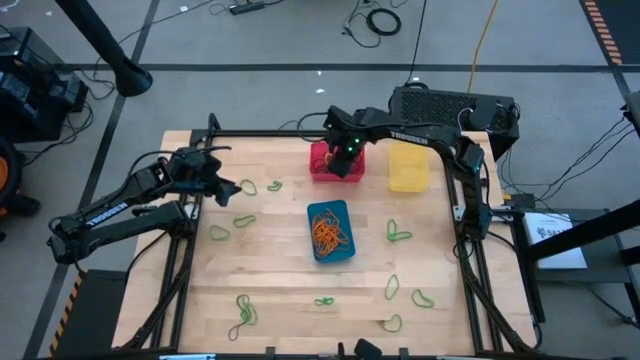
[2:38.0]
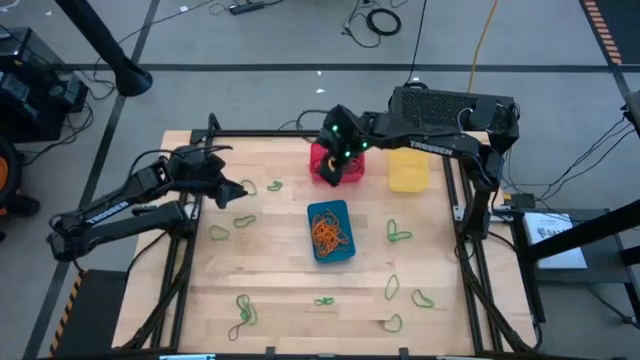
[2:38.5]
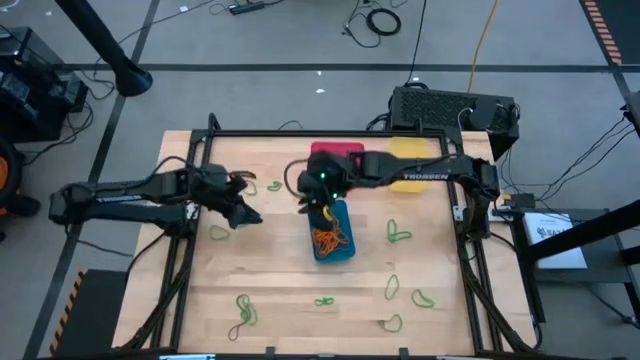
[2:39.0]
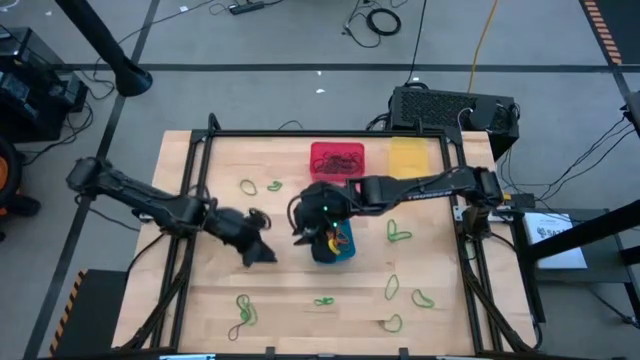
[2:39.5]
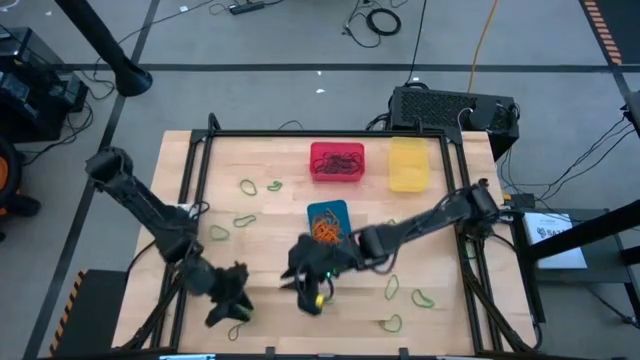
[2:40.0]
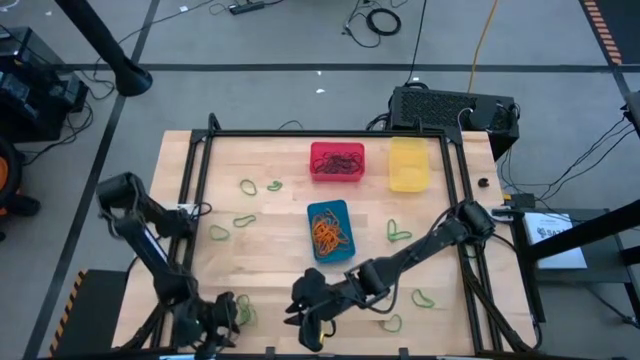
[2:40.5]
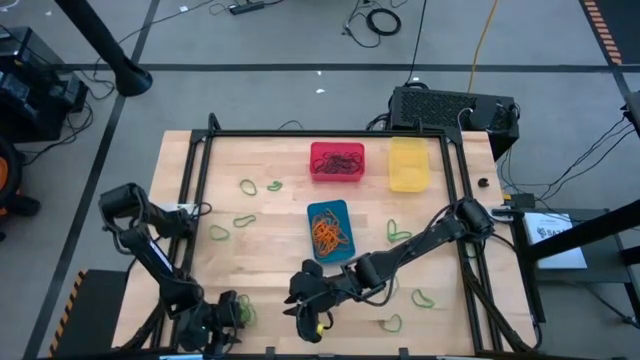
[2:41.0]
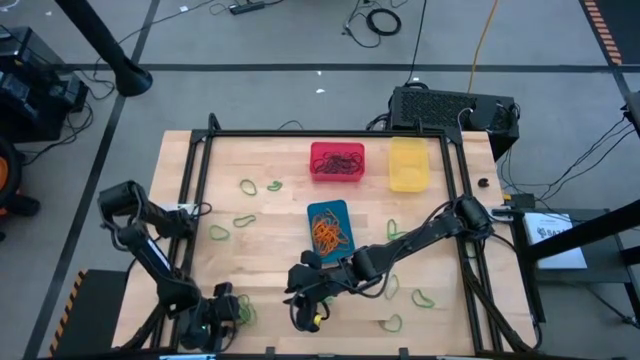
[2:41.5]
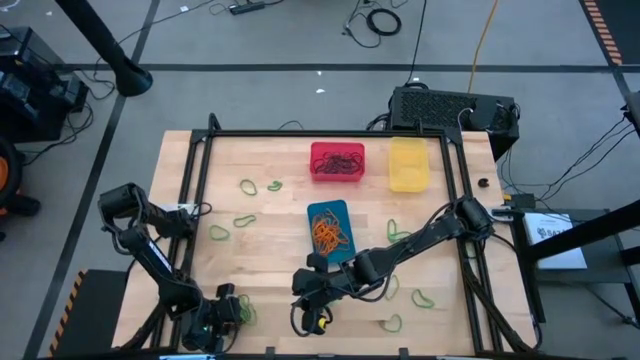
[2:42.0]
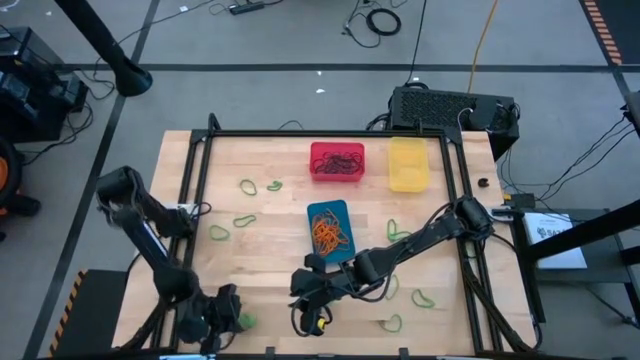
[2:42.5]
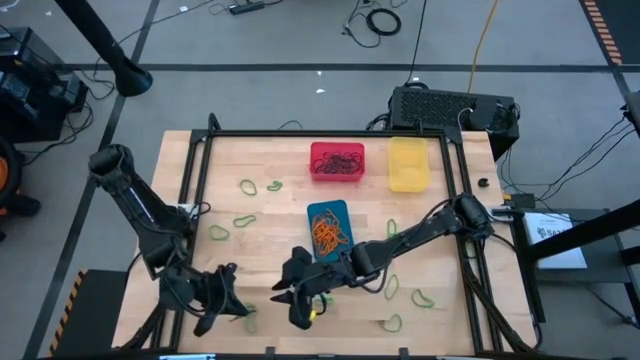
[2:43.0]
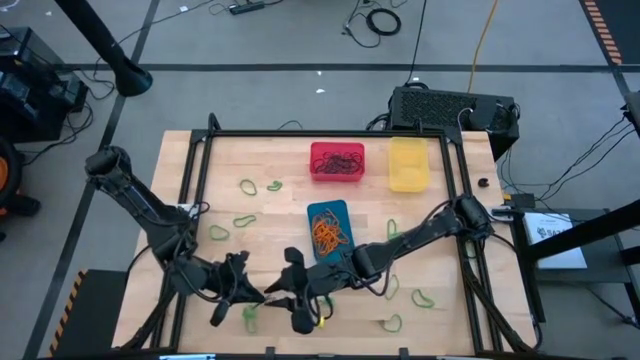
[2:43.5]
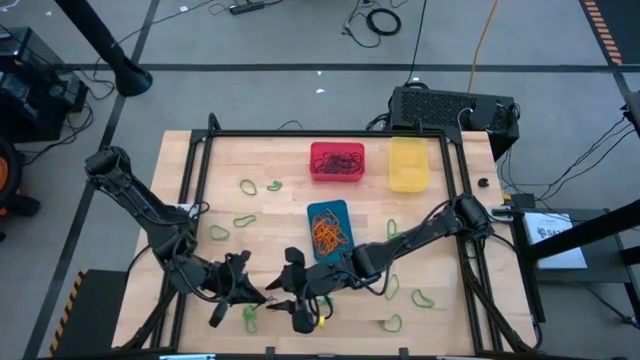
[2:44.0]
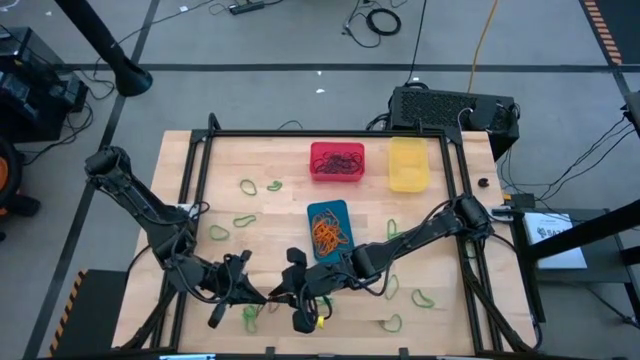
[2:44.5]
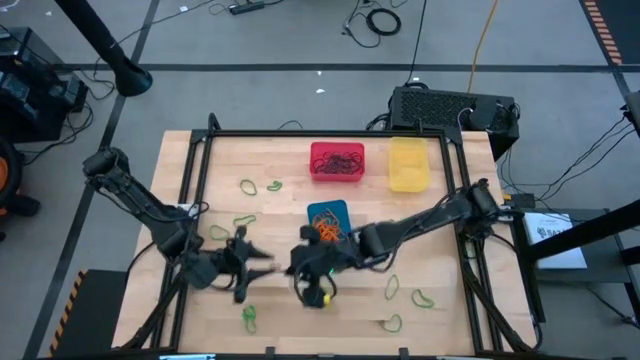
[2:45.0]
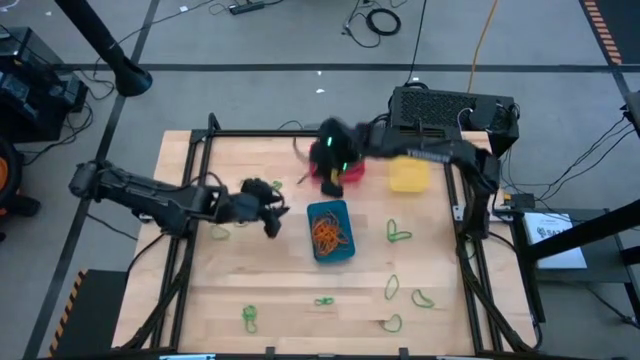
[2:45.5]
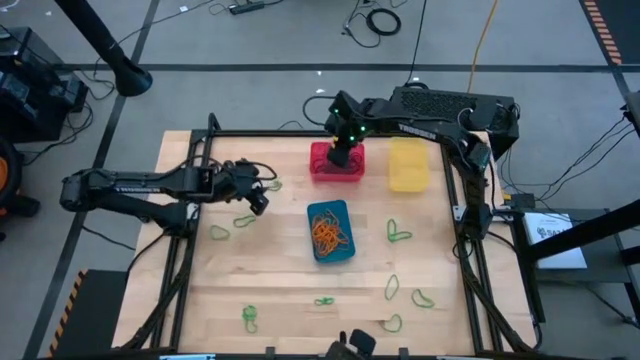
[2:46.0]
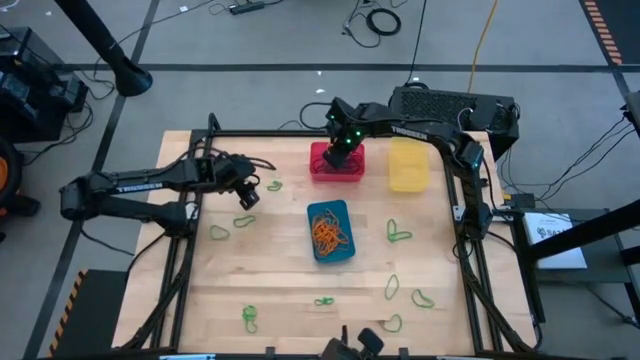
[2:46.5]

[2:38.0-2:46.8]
Task: Sort rubber bands into baskets
Put the purple rubber band into the red bin

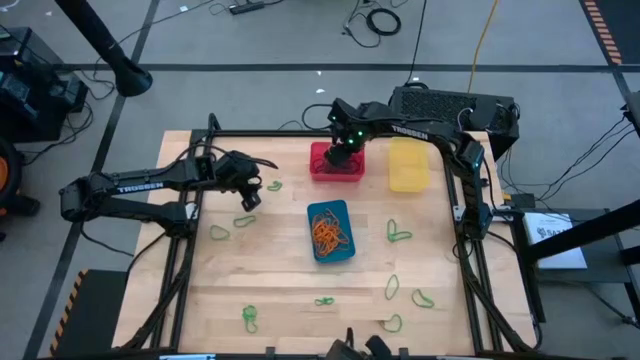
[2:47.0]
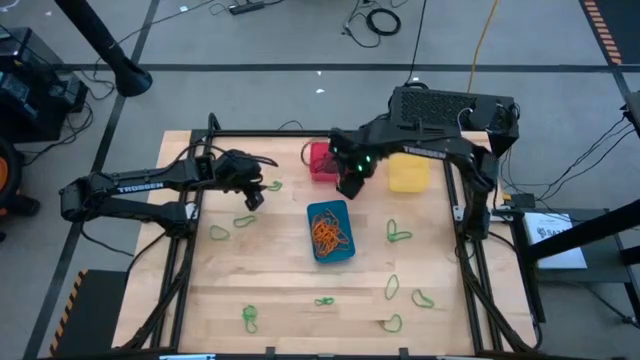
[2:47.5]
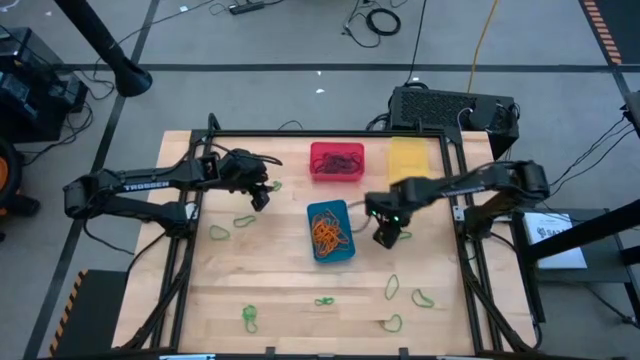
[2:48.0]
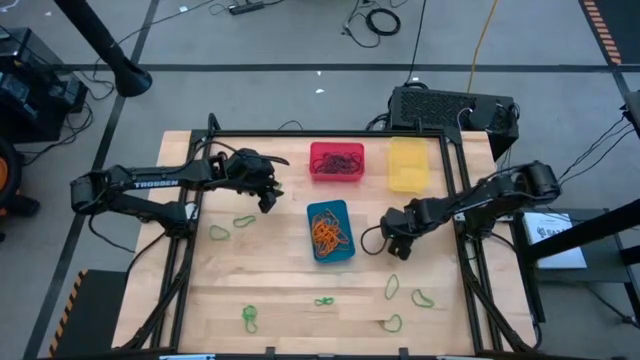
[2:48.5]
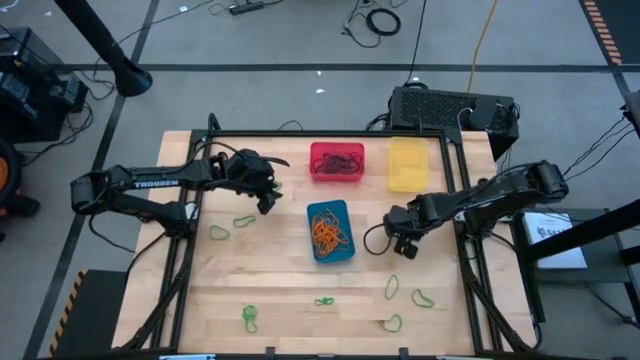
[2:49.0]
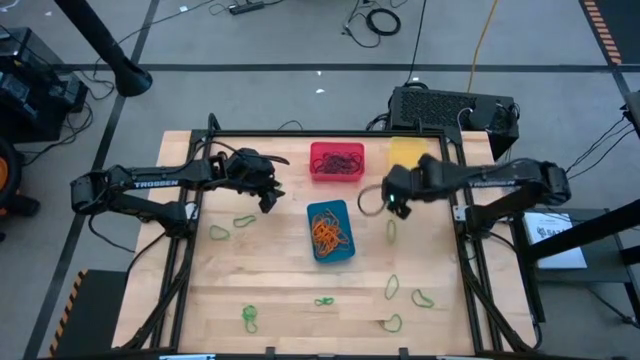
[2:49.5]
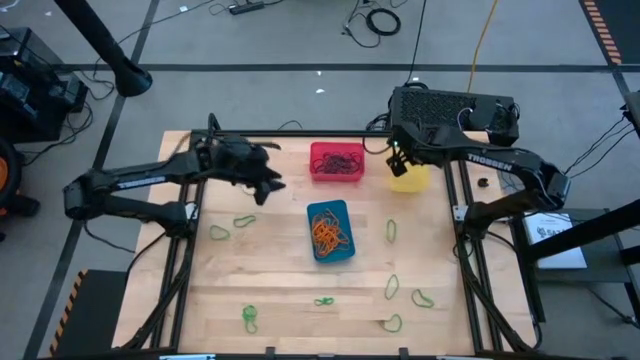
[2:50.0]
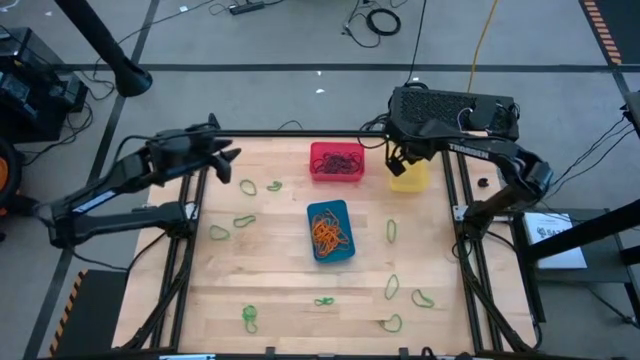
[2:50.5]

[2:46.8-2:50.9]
Put the green rubber band into the yellow bin

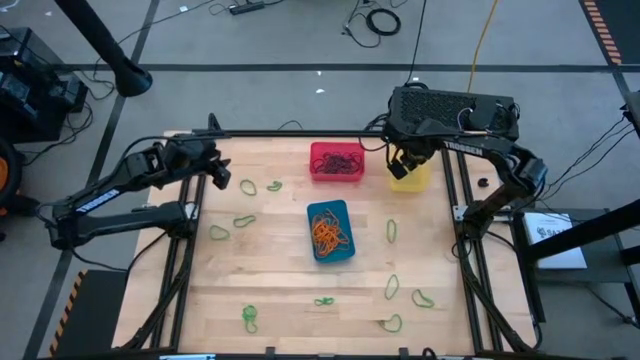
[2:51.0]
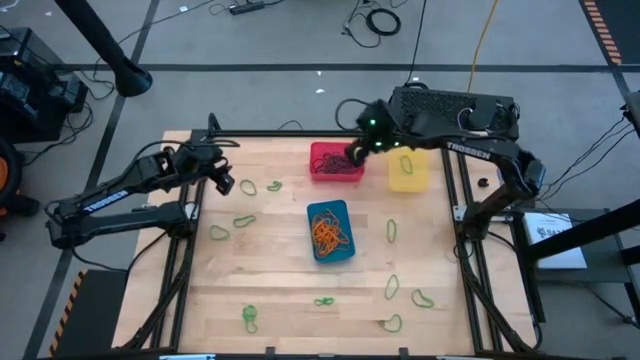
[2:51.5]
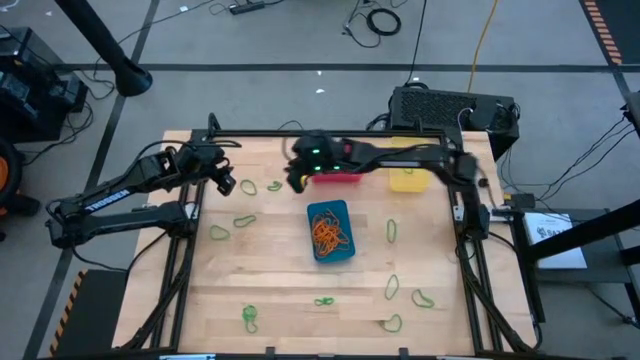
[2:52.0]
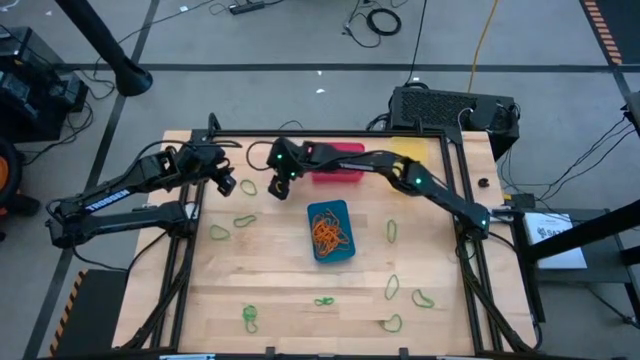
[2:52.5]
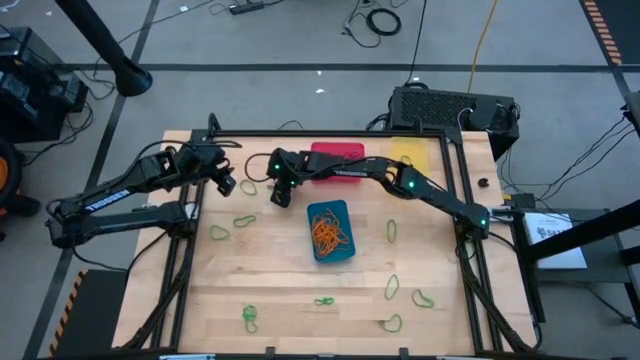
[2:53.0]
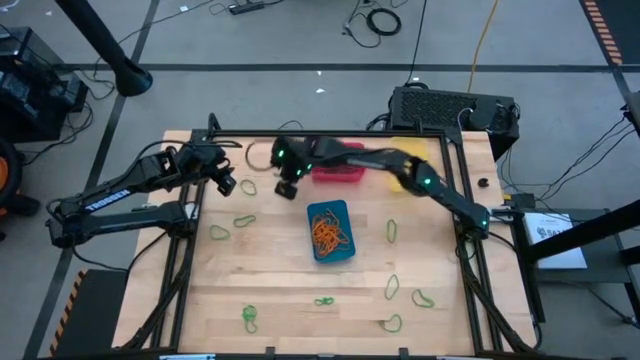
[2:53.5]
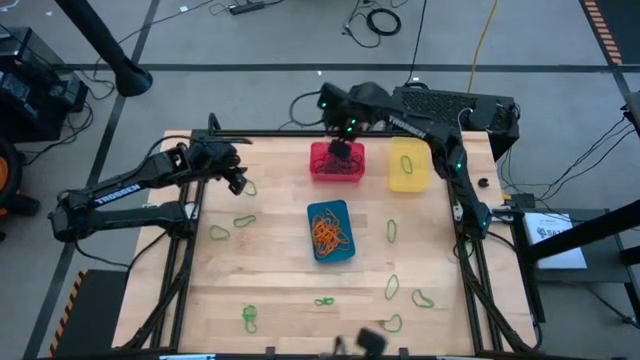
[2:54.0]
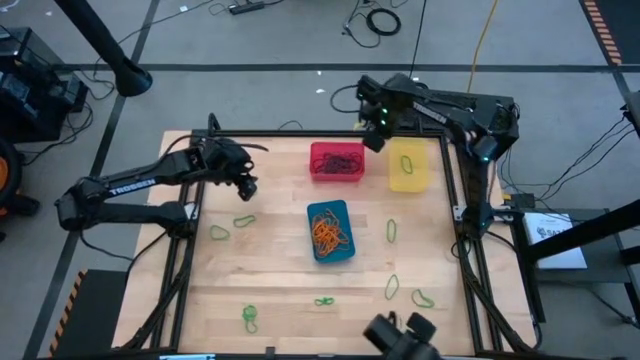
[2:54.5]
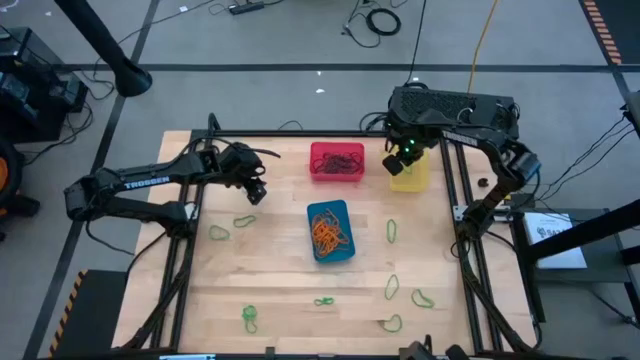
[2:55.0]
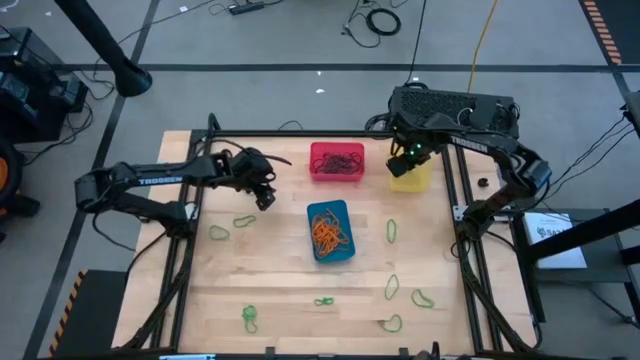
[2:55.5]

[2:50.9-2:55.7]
Put the green rubber band into the yellow bin

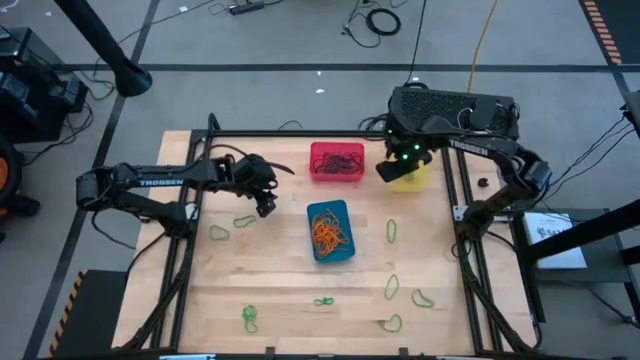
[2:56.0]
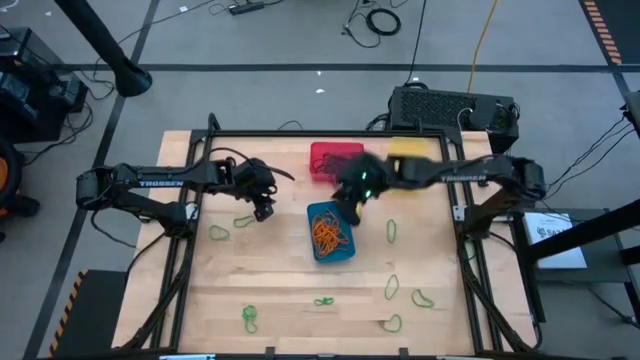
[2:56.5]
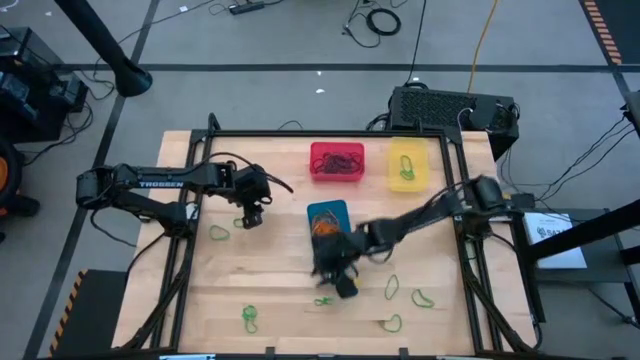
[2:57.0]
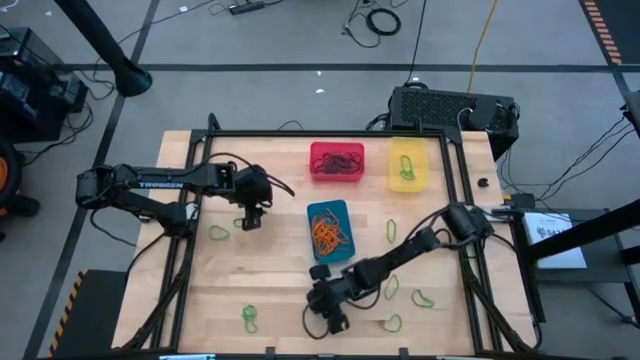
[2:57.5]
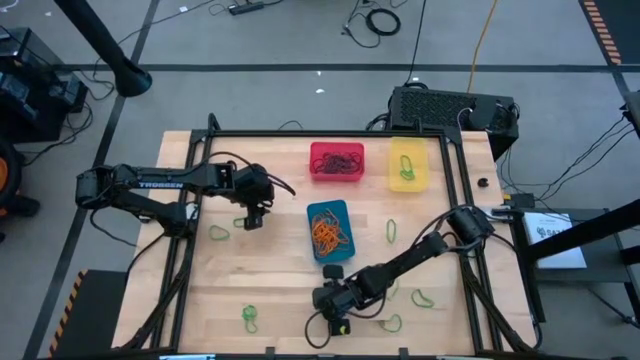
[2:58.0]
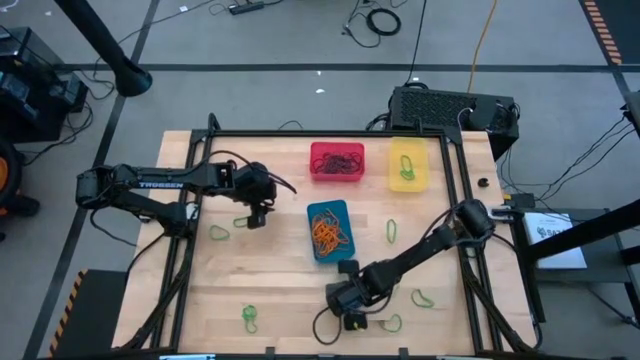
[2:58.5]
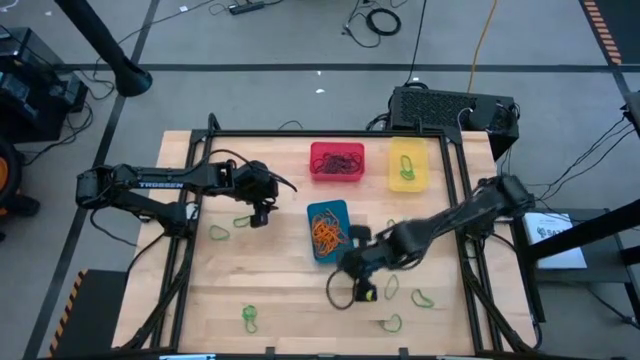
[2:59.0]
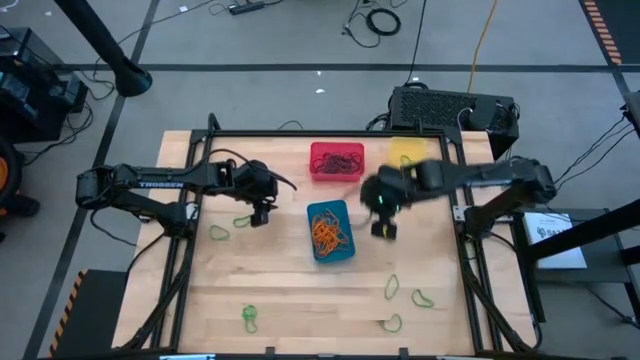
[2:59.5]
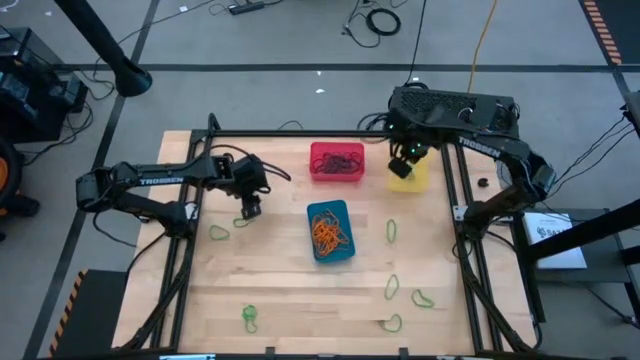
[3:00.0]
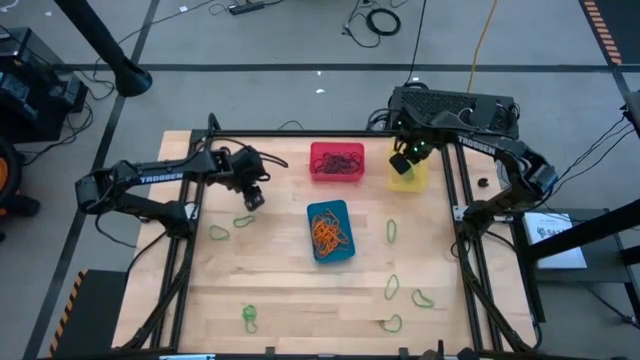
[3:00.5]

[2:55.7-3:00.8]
Put the green rubber band into the yellow bin
